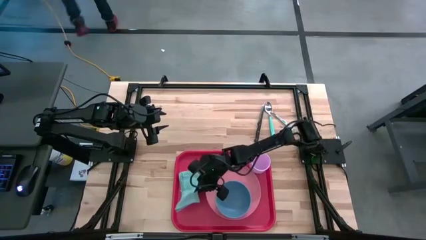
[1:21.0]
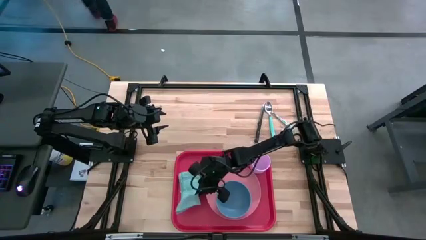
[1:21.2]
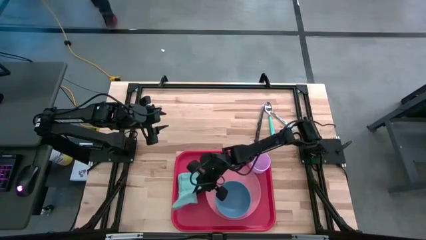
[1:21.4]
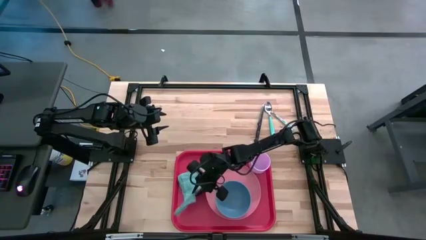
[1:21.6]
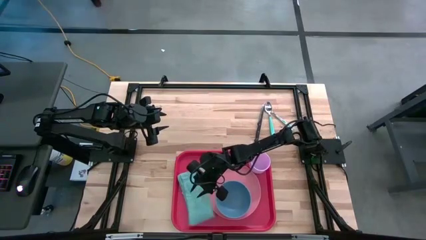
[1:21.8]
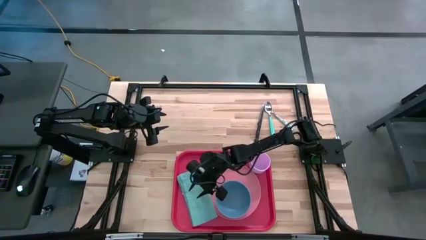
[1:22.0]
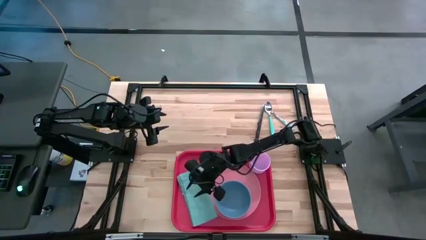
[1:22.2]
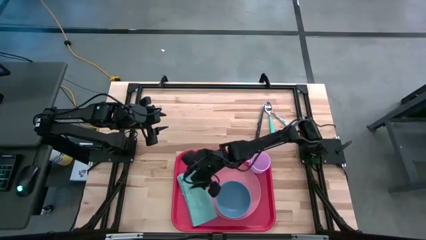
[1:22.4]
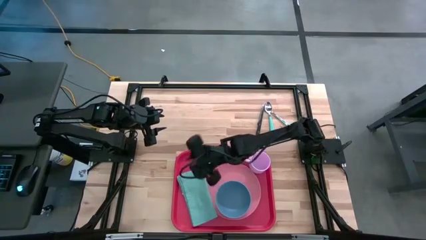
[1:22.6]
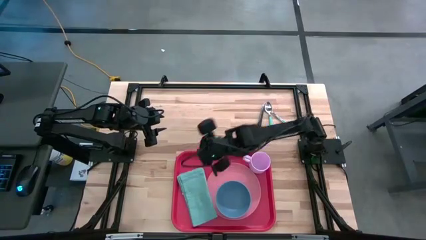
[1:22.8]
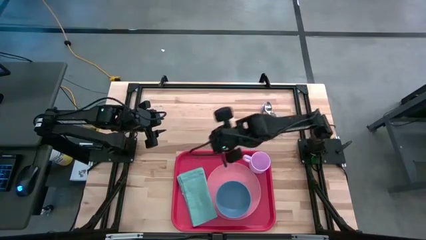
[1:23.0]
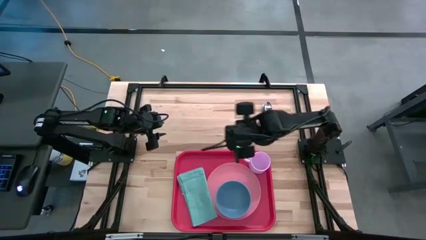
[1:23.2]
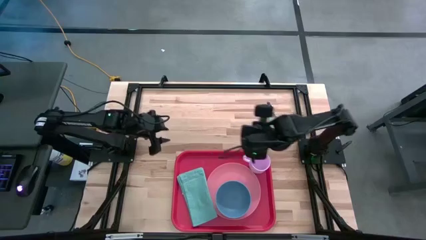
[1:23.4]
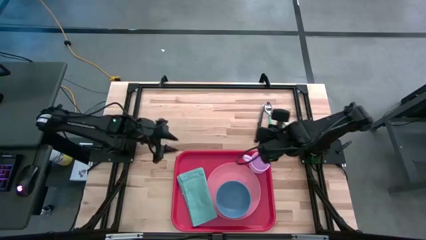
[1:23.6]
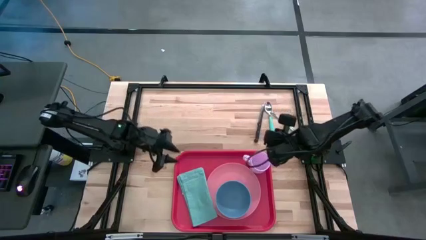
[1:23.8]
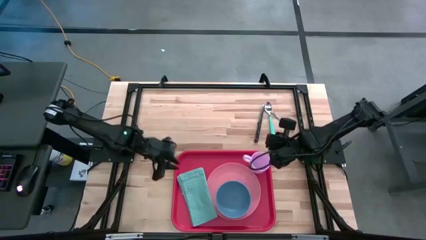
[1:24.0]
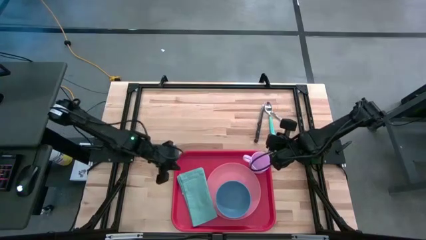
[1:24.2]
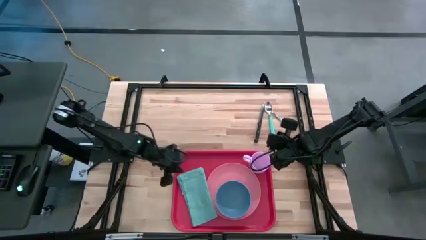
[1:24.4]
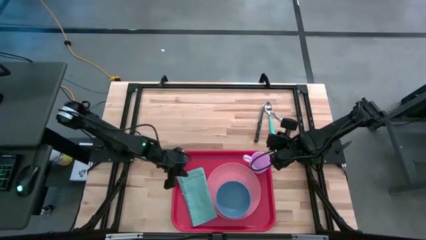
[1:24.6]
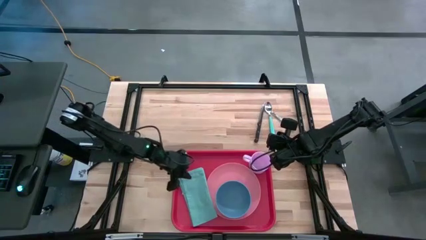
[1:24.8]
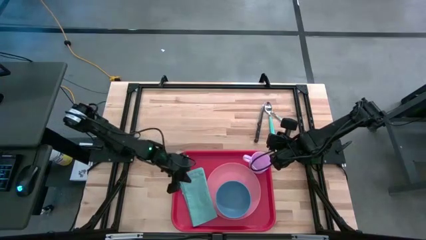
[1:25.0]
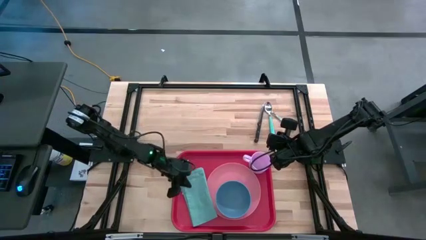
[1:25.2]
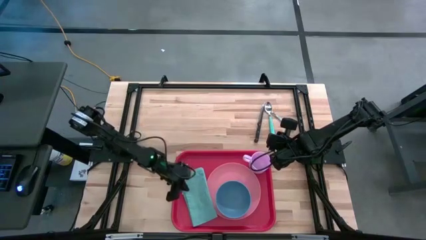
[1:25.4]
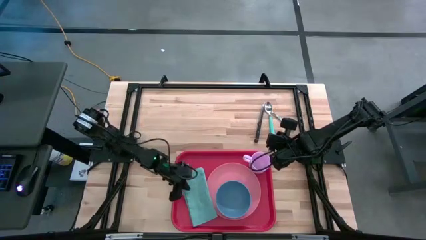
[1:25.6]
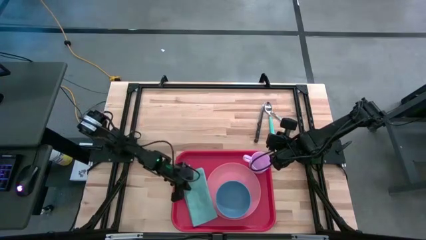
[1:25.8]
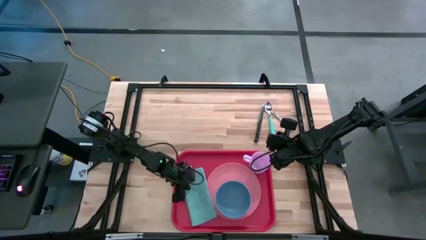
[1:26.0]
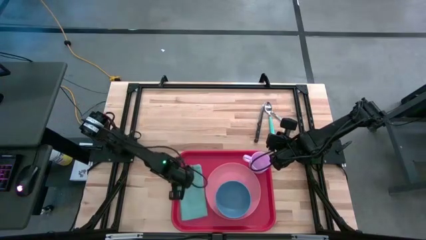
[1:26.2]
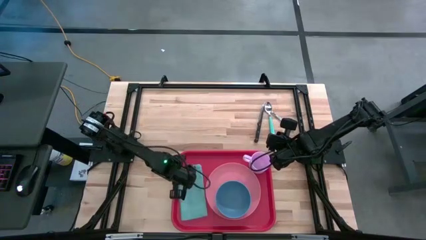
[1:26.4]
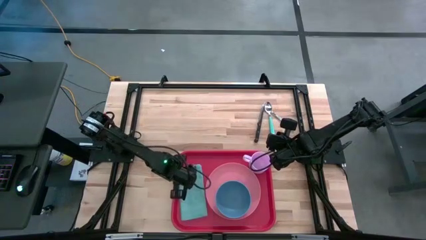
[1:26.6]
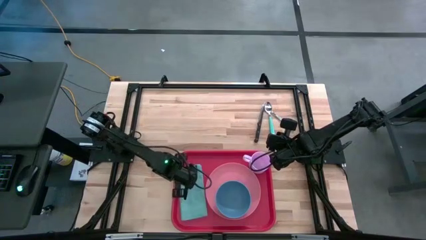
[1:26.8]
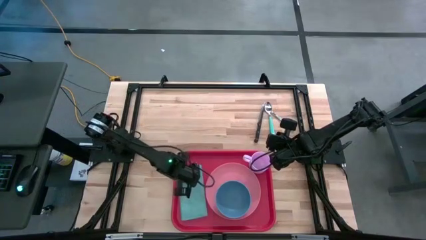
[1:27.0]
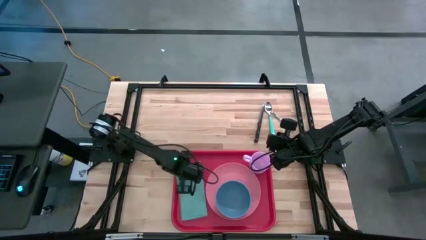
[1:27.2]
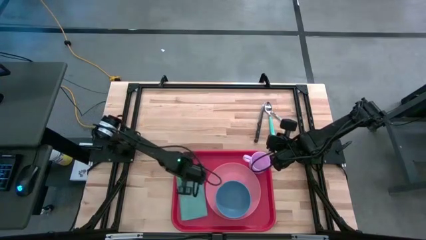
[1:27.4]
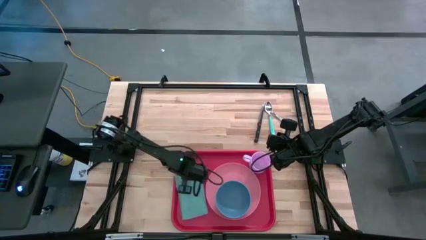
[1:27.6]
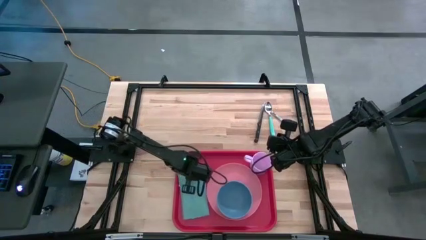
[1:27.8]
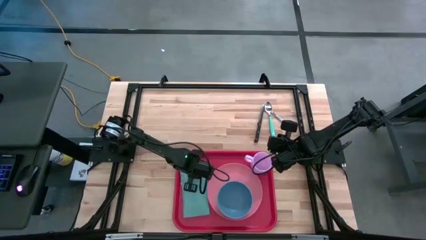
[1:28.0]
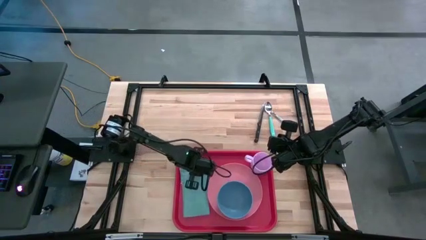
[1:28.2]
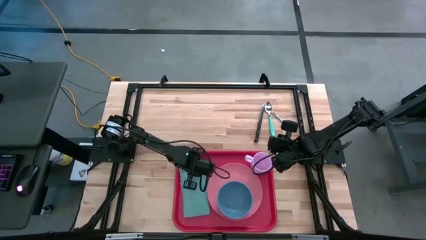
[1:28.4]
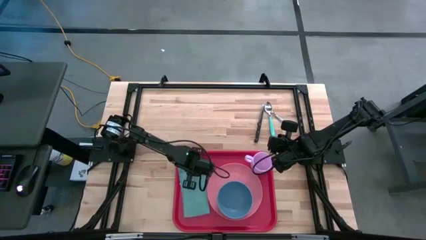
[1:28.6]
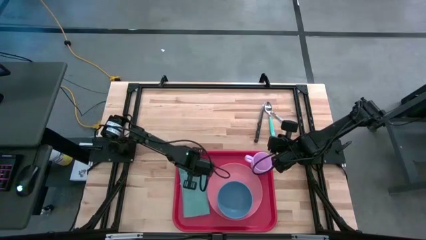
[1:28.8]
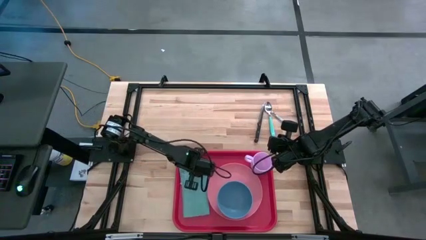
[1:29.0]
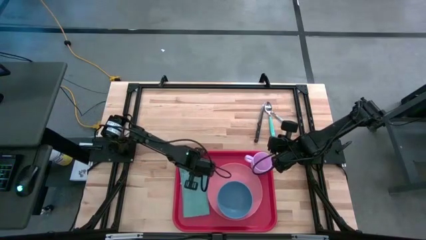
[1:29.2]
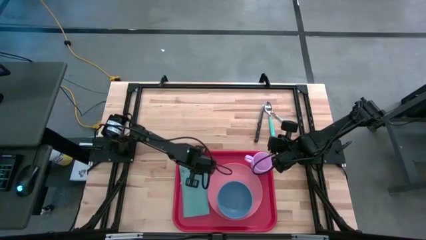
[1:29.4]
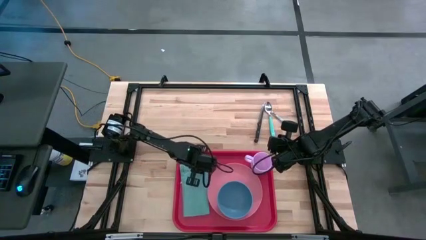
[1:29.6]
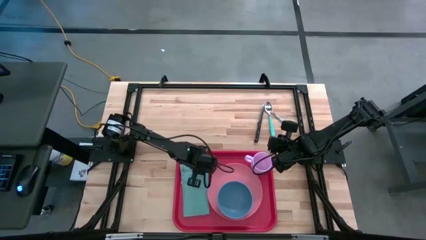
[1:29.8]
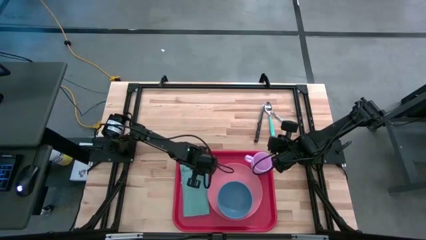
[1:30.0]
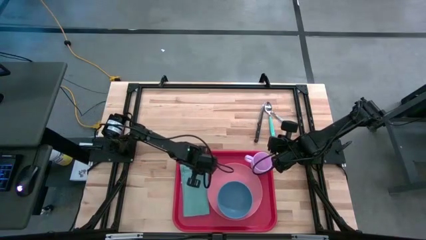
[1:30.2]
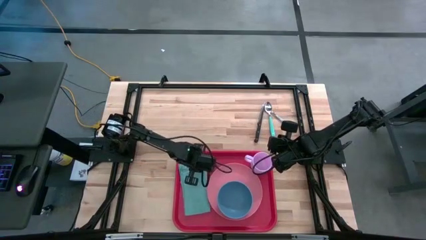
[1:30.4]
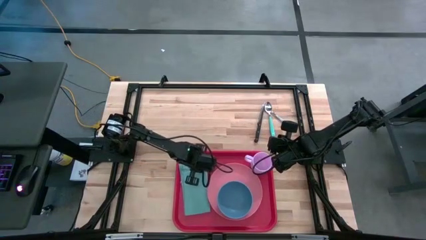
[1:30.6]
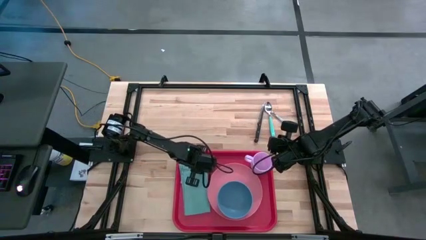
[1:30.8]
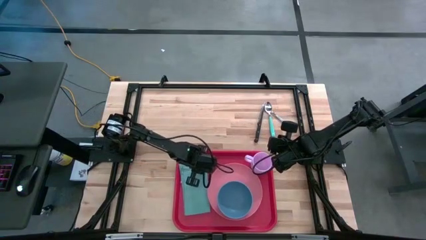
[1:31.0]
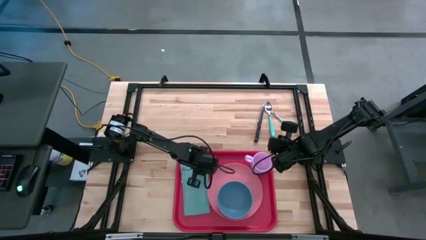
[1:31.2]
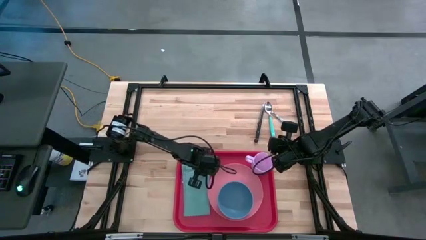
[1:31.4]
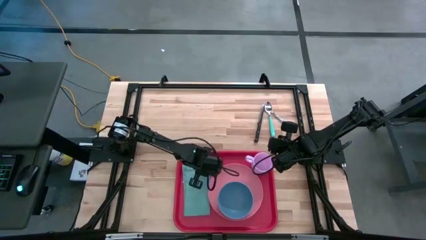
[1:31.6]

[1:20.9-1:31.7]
Task: Set up tray
Put the blue napkin on the red tray beside the pink plate

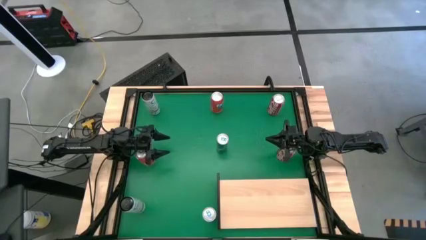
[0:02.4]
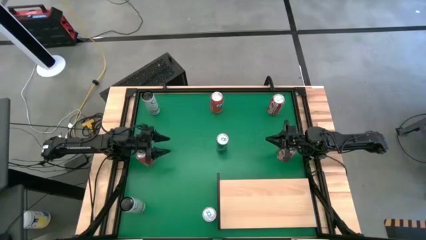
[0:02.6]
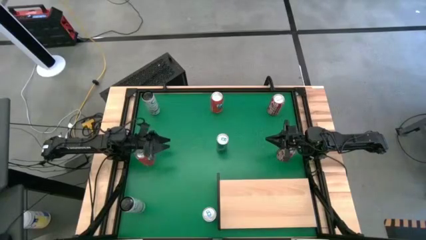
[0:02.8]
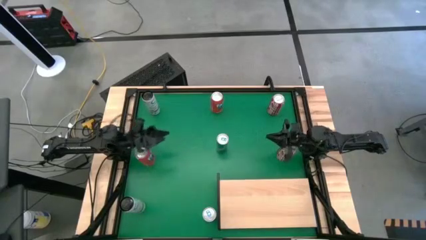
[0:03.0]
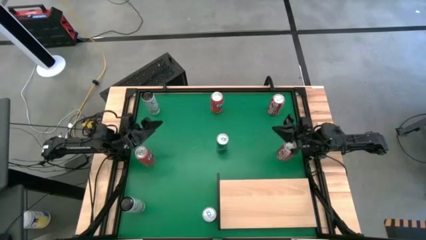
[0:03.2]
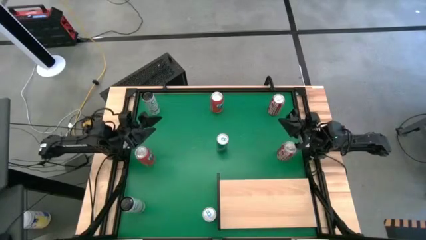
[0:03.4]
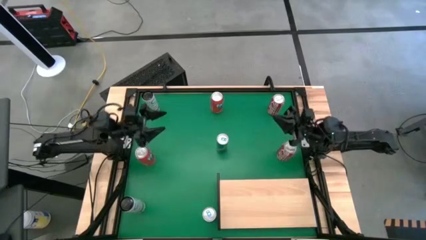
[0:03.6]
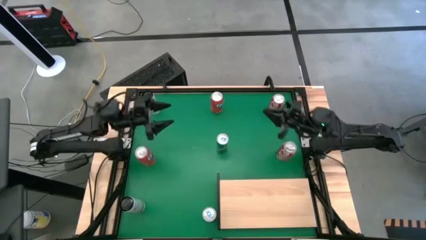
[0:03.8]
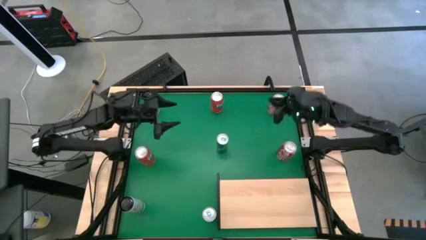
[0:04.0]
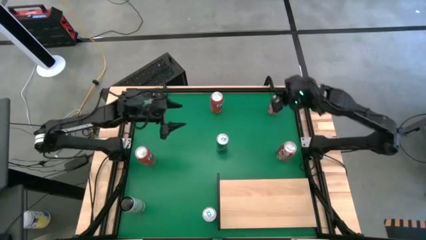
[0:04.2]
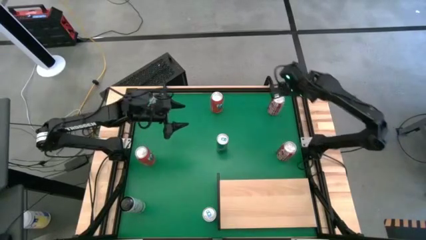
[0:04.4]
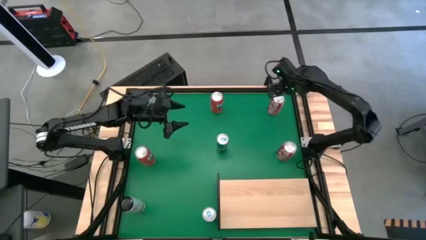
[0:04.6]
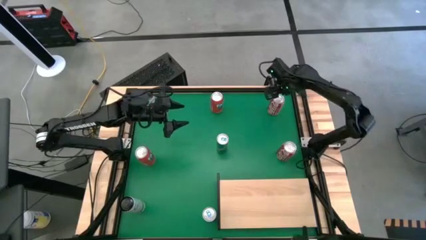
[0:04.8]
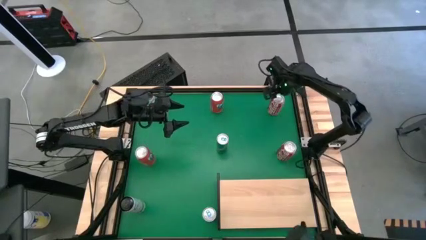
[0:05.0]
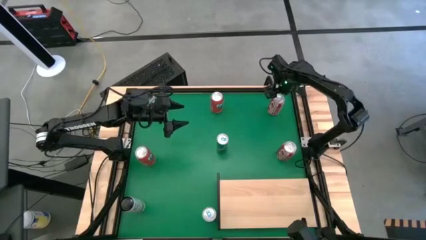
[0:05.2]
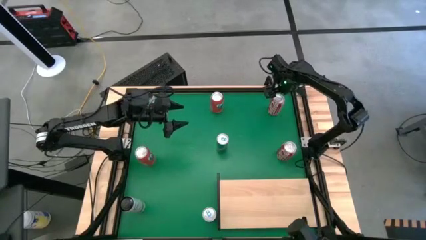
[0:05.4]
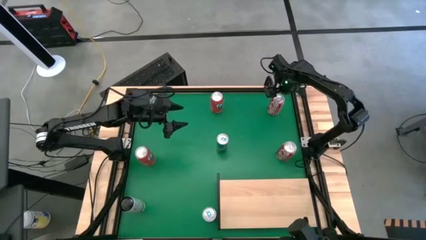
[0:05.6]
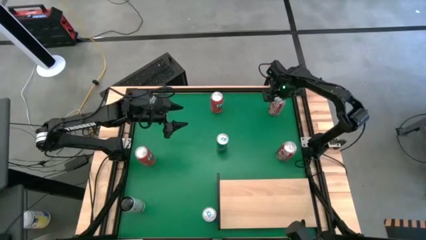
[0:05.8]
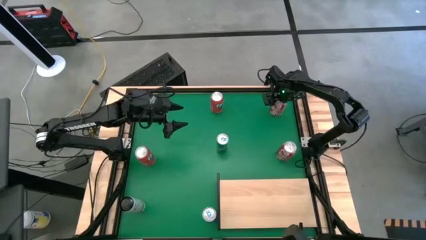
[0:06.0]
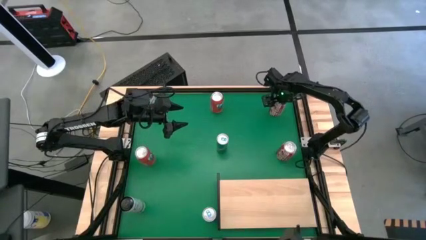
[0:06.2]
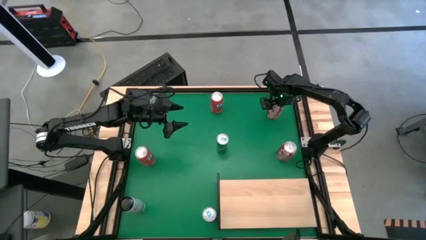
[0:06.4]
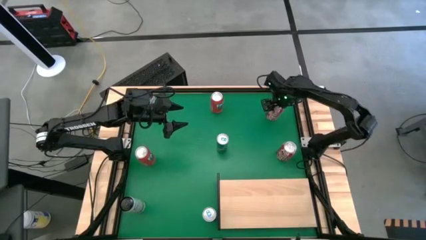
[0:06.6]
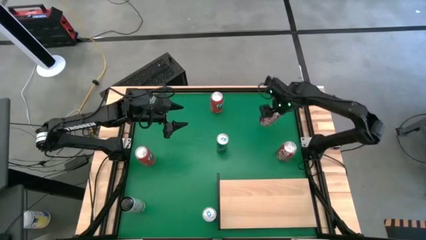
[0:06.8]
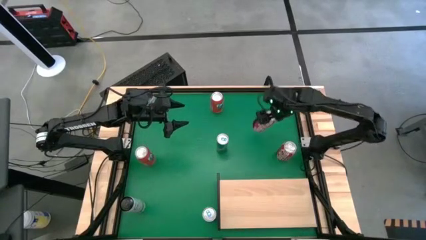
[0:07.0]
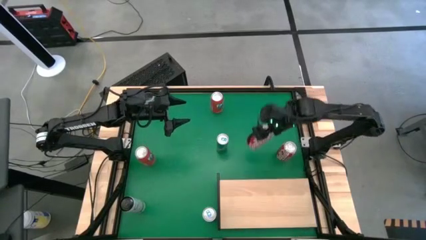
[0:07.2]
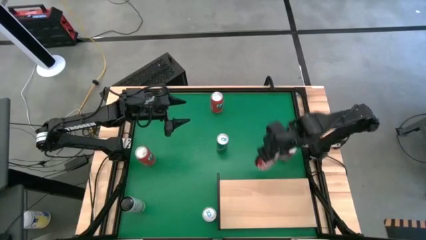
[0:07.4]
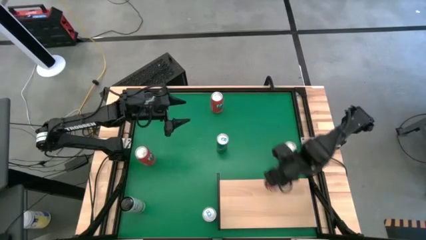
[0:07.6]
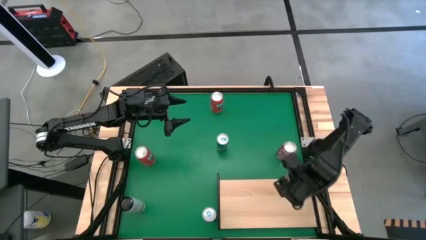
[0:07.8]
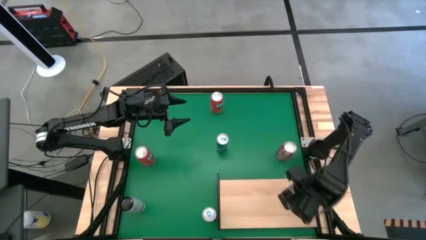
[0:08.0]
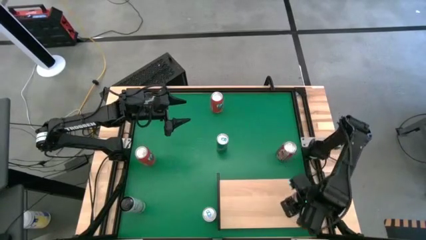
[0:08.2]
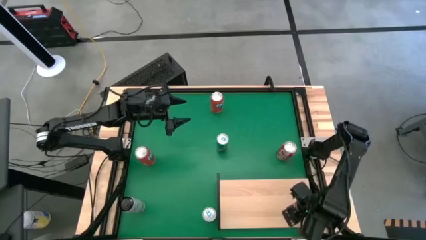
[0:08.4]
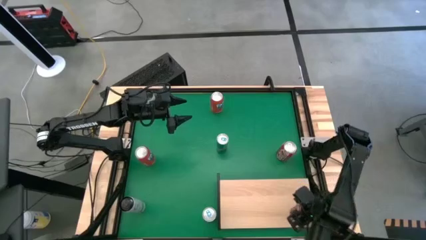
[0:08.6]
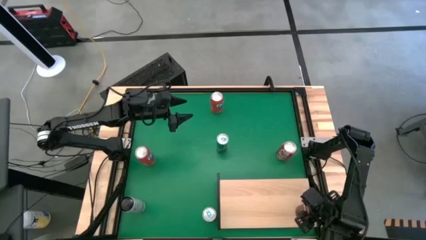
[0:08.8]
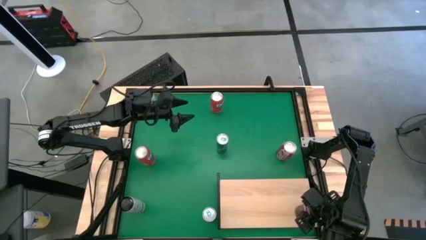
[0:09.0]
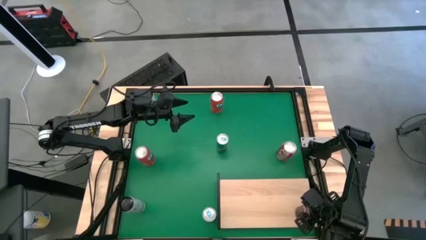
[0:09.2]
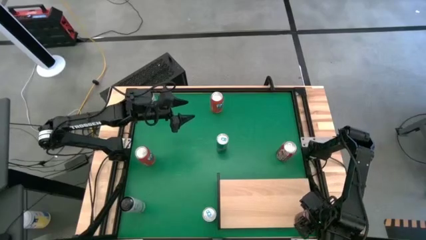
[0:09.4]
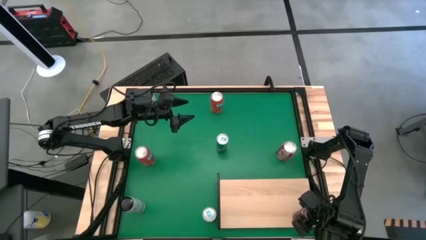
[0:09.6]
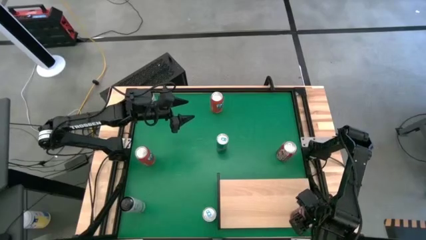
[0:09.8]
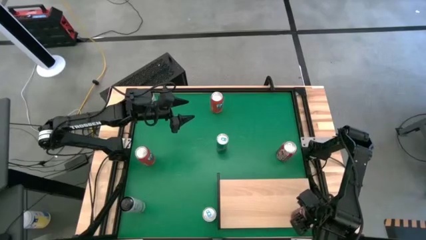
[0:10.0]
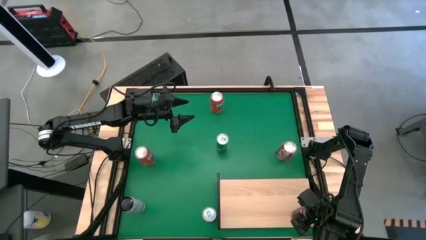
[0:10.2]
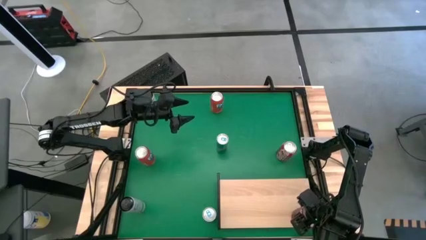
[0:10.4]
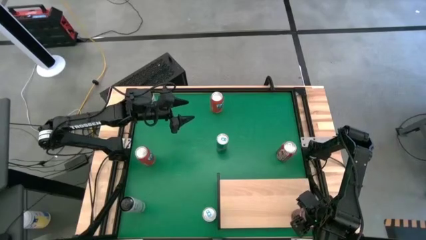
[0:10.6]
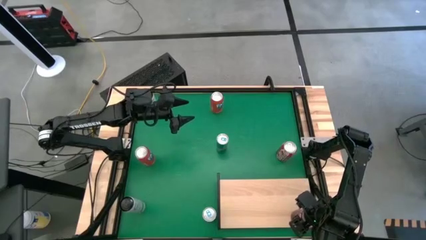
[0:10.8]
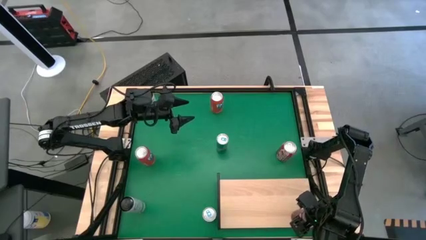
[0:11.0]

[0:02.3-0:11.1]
Task: Place canned beverage on shelf
Put the top red white soda can on the shelf
